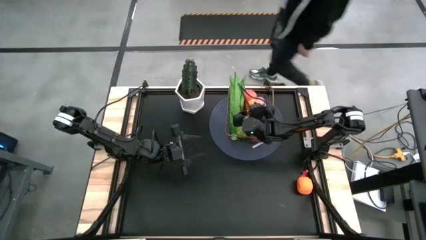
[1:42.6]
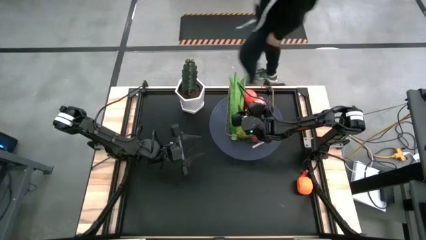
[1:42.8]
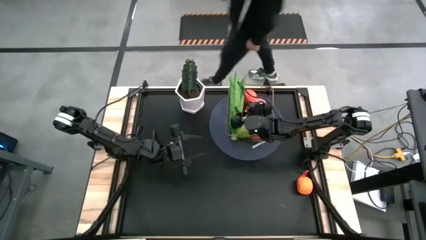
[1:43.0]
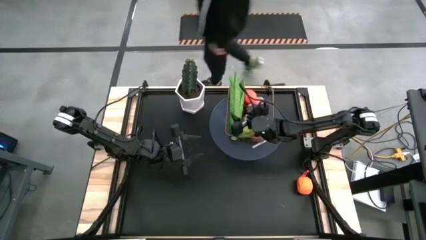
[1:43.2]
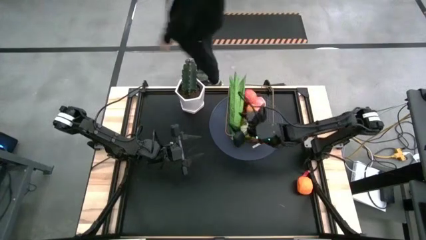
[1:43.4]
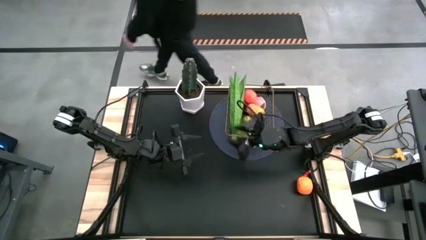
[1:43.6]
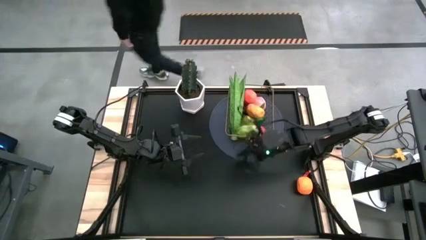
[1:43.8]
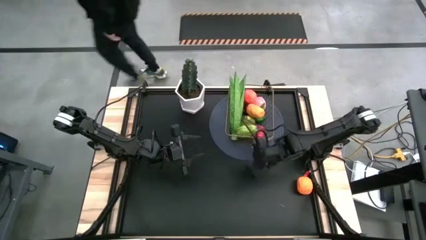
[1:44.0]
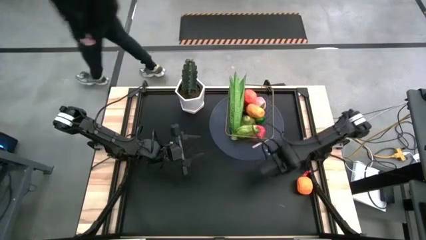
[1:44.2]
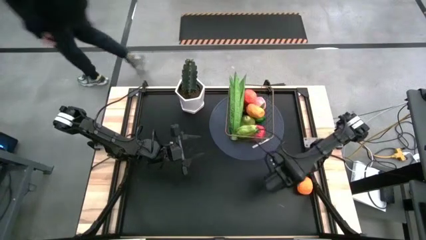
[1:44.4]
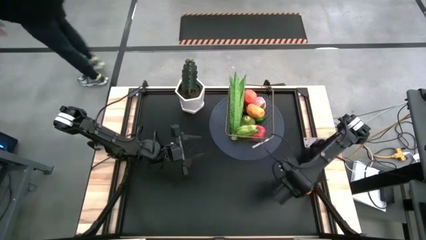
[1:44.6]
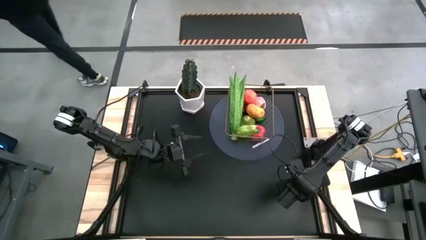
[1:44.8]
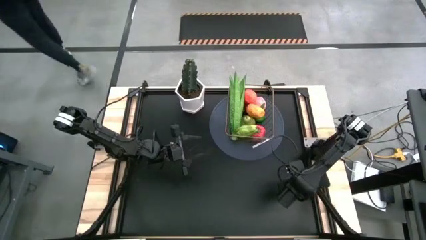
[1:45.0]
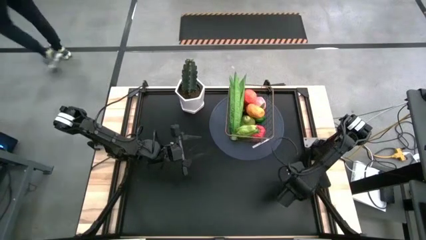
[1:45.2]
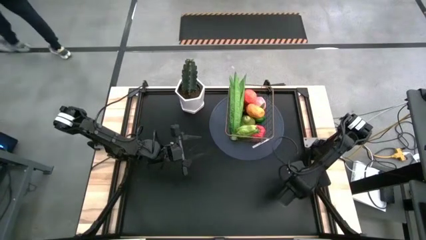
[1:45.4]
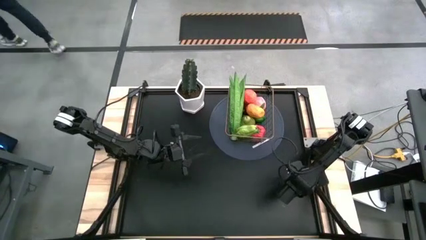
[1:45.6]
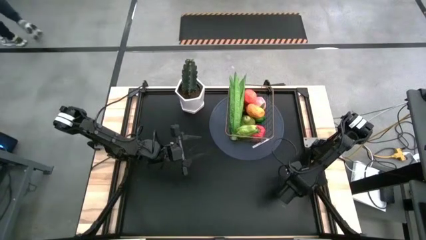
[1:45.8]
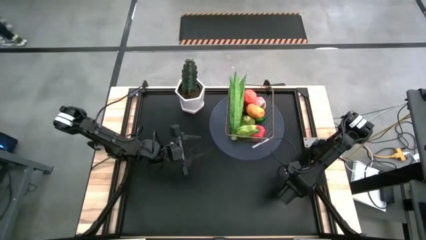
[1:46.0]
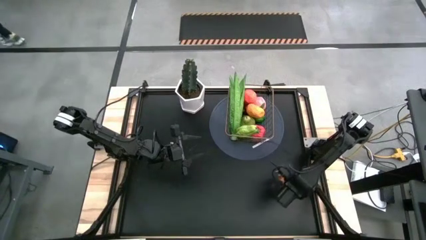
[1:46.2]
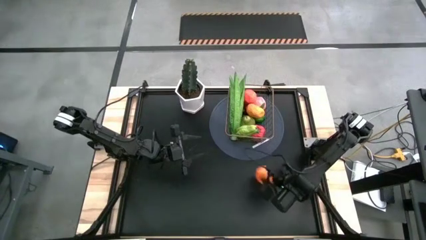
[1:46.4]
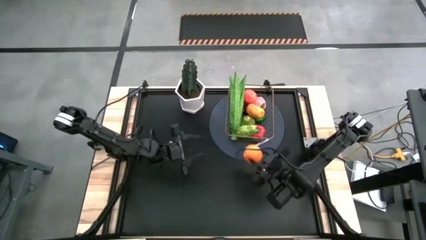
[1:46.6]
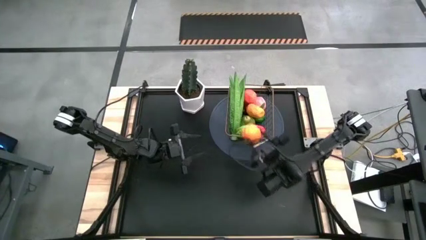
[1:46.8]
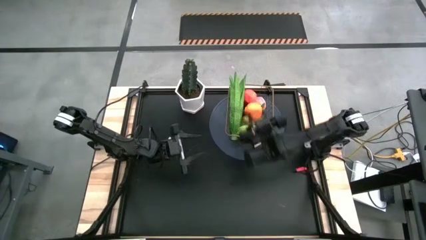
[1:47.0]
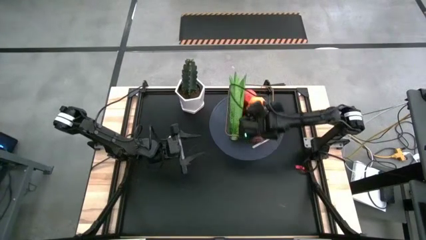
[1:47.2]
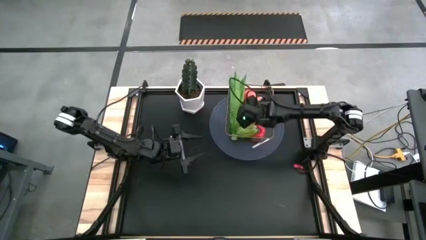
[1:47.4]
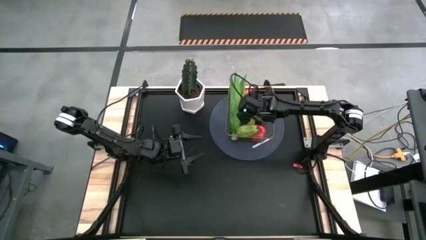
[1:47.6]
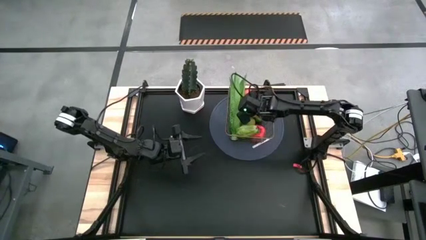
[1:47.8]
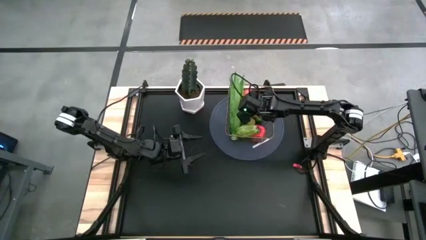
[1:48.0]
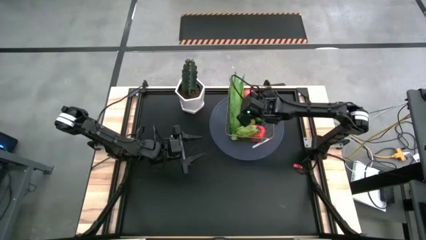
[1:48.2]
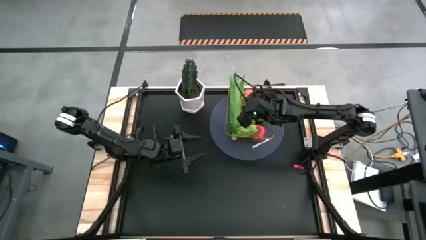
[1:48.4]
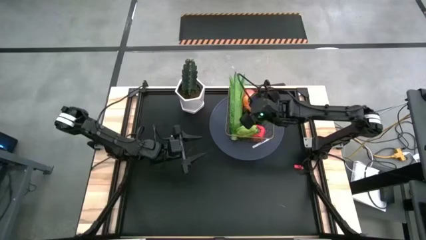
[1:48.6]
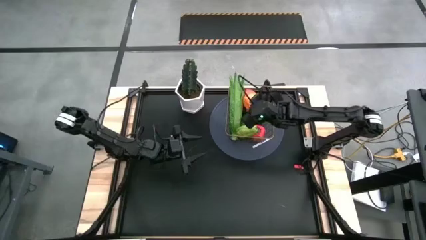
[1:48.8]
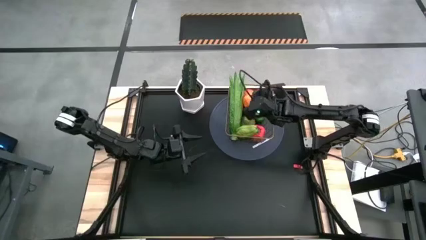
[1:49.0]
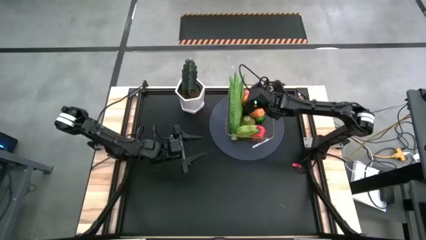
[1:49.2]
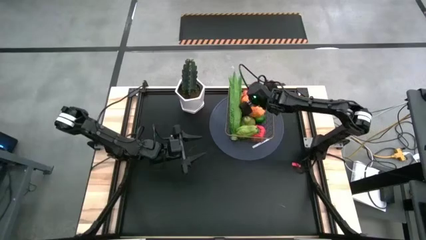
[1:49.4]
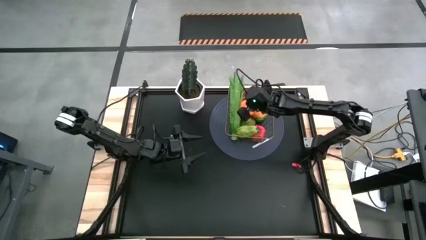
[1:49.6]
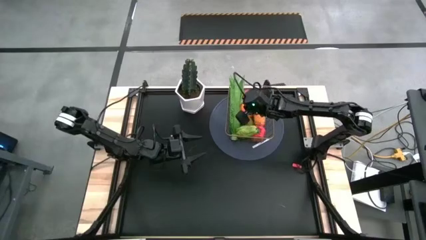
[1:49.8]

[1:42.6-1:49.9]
Task: Build produce basket
Put the orange into the gold wire basket

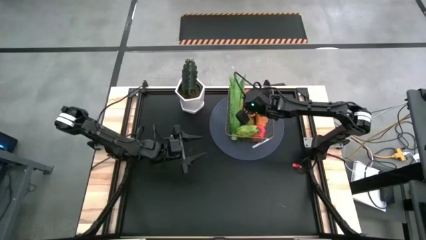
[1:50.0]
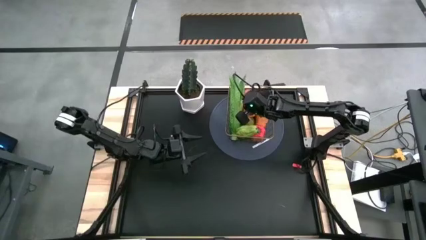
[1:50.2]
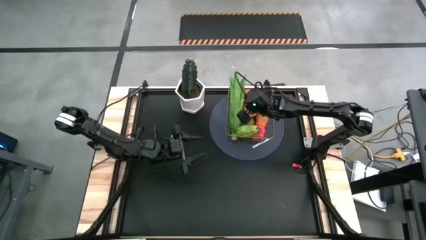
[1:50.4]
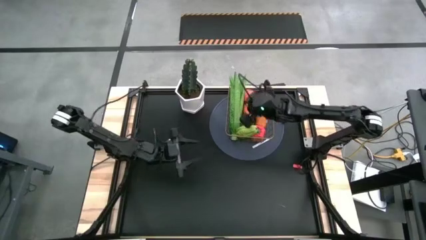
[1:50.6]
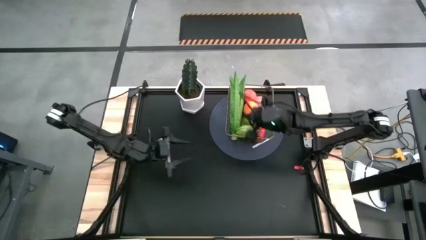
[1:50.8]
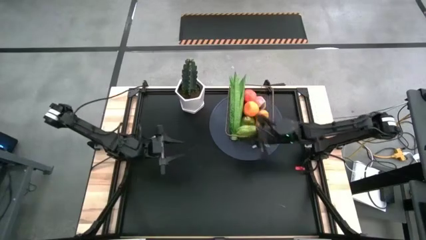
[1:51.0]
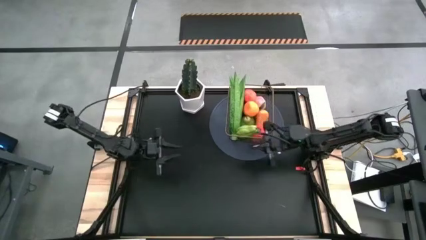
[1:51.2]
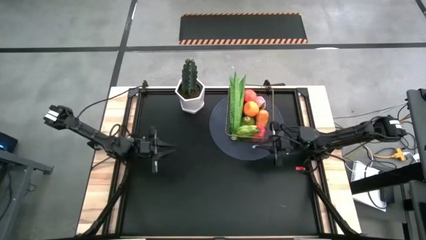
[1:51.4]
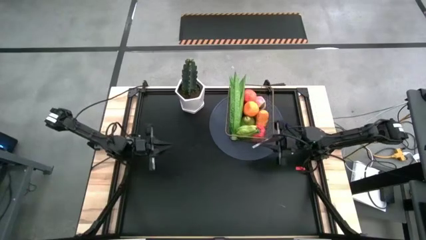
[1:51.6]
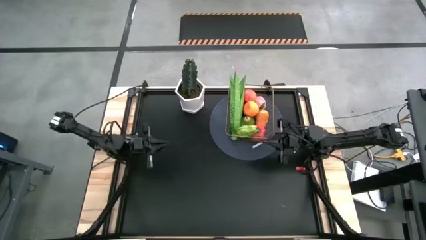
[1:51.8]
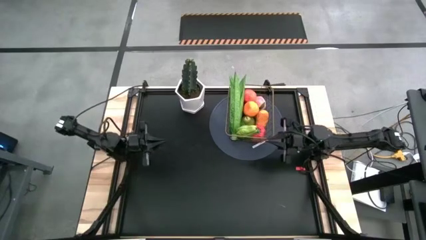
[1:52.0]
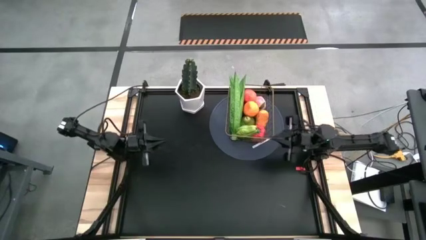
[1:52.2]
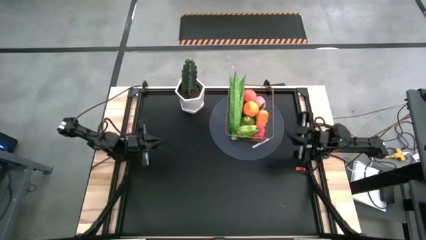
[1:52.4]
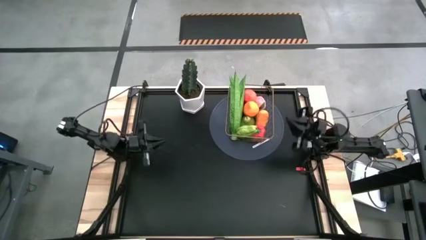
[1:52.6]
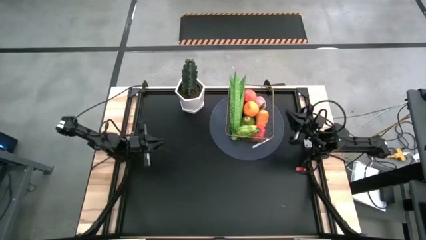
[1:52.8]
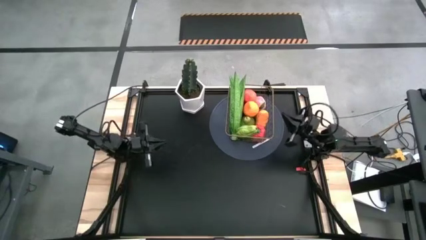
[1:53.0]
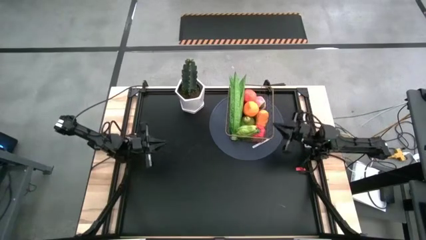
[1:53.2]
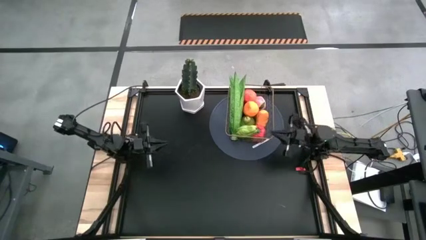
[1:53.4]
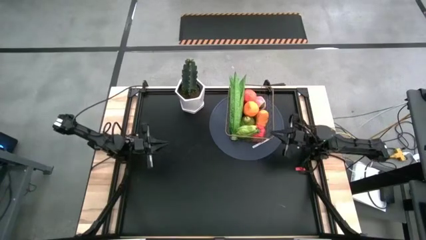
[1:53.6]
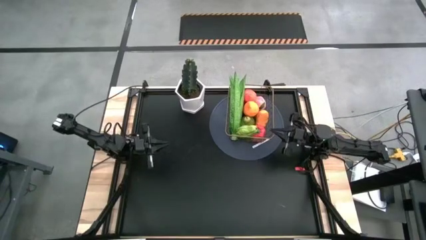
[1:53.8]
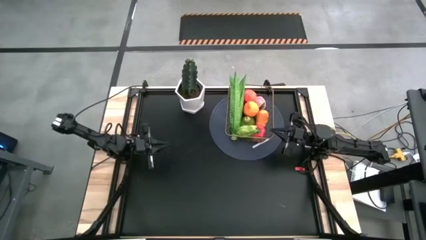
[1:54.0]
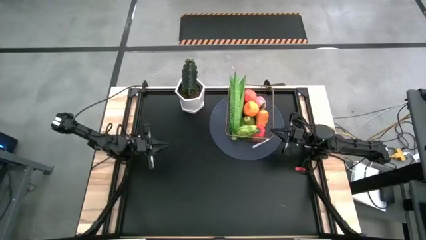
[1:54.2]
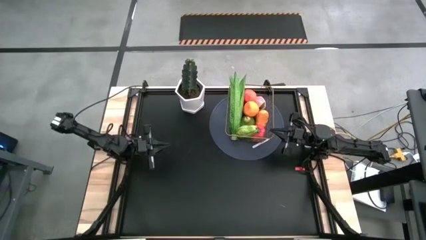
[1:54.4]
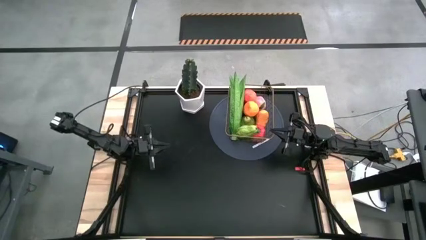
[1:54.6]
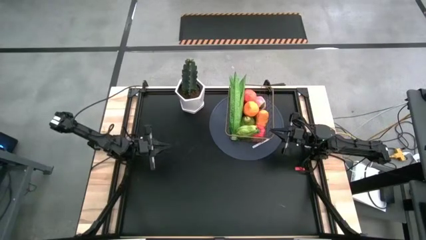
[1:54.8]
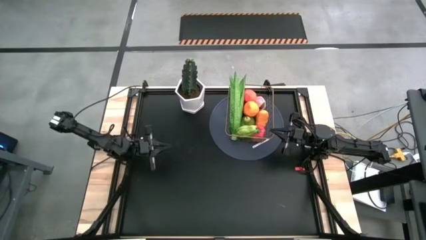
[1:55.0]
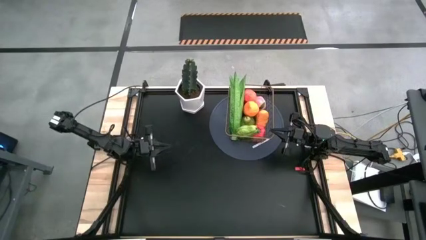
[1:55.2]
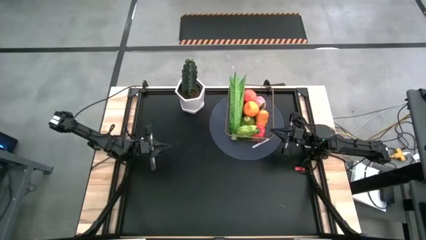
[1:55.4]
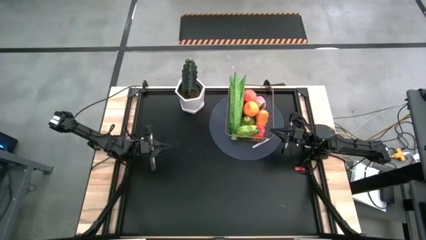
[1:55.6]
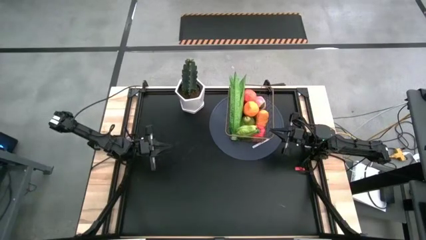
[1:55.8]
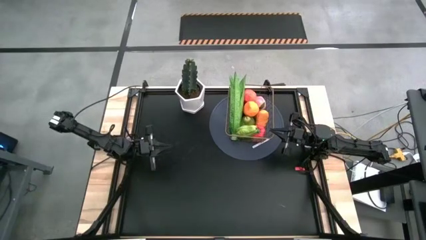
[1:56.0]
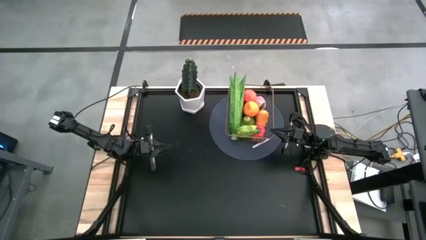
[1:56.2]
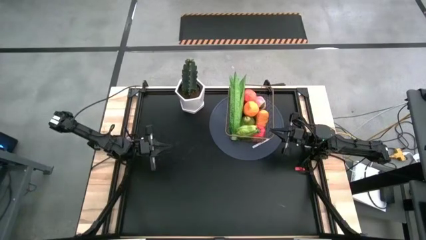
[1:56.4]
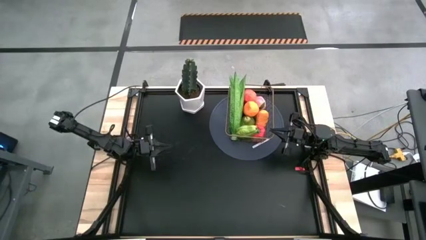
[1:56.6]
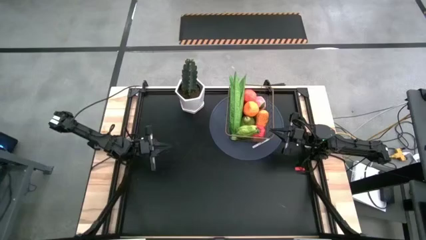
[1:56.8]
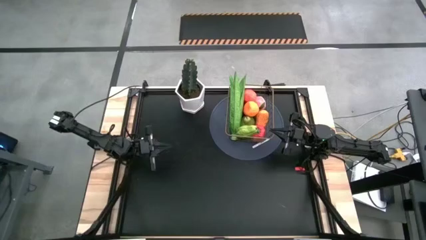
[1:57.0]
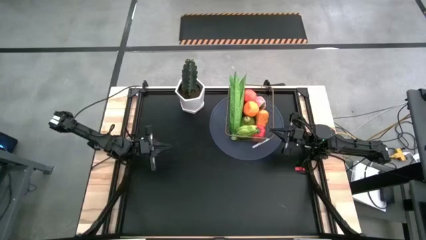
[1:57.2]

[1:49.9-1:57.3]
Return to Home Position

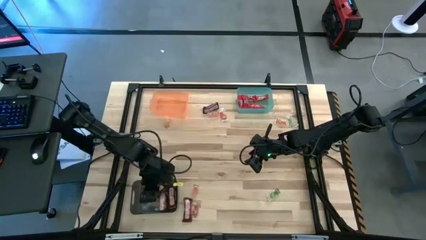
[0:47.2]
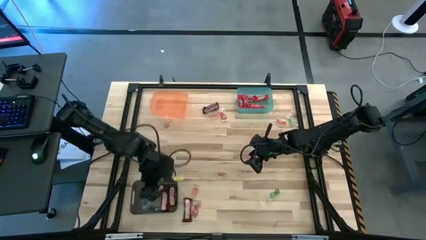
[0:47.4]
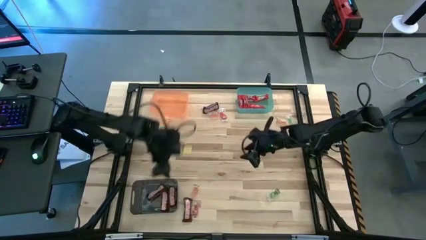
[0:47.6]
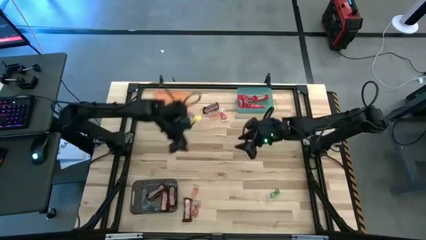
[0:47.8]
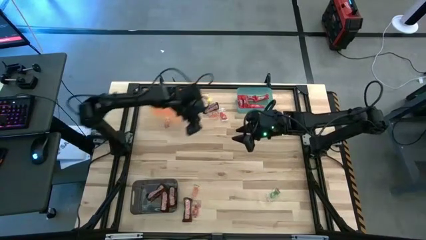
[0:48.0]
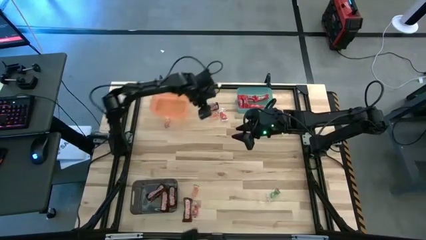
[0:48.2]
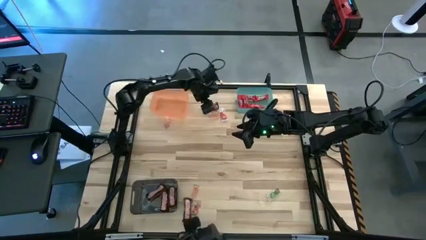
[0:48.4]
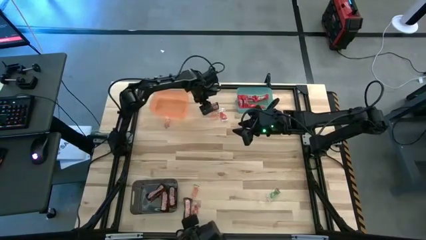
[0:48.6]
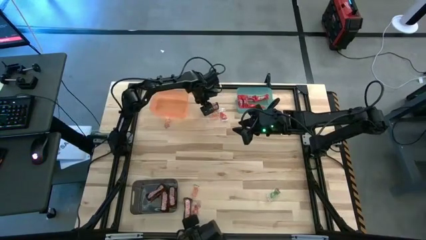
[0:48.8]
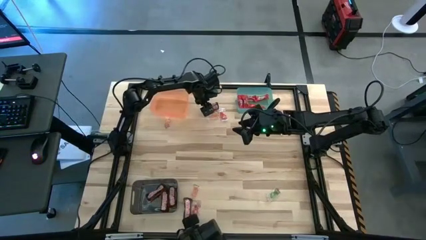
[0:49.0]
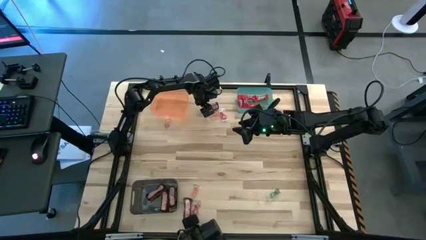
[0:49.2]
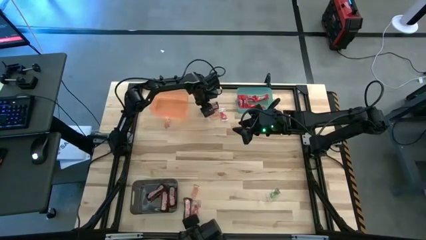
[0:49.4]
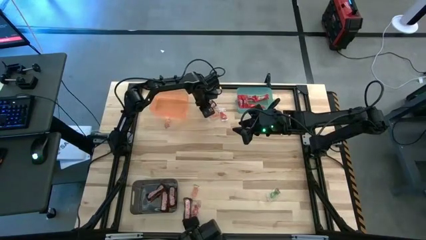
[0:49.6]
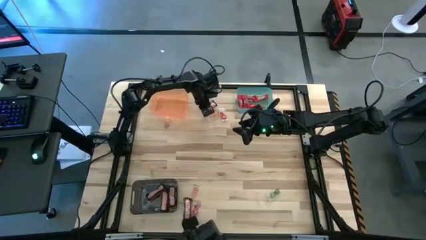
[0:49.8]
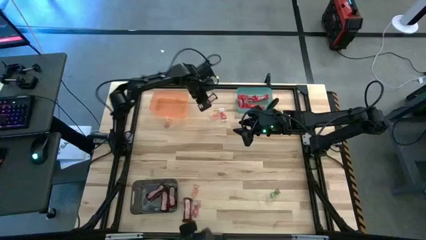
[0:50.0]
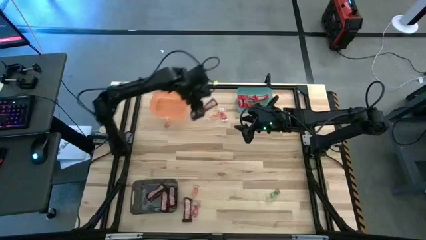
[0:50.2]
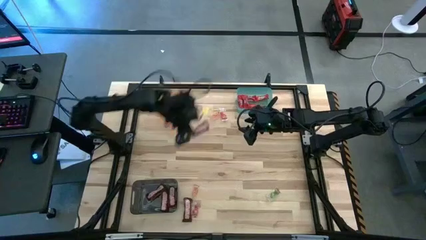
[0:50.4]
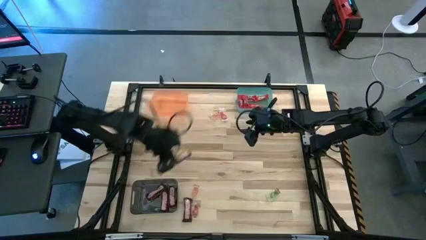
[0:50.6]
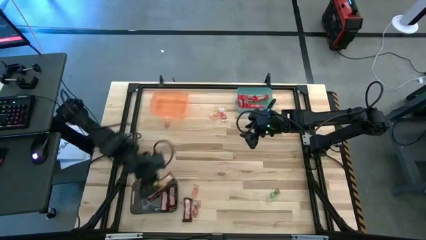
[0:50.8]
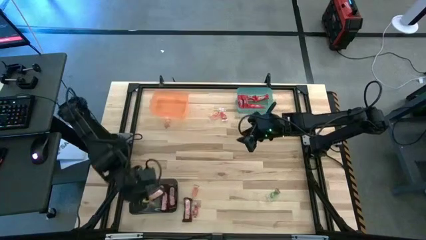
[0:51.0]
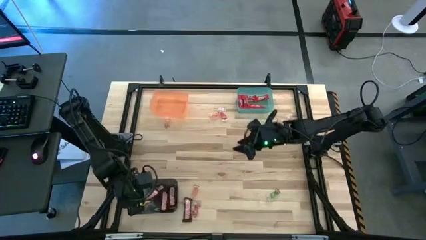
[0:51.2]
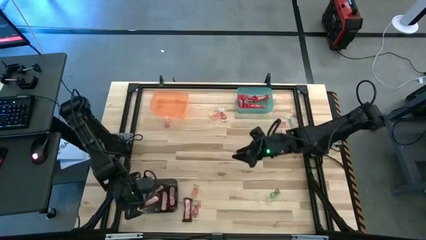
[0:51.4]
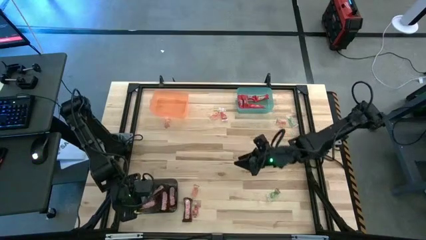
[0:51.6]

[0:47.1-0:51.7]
Task: Sort candy by brand, put in halloween buckets
Put the brown chocolate bar into the black bin
